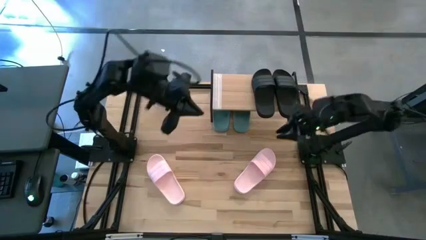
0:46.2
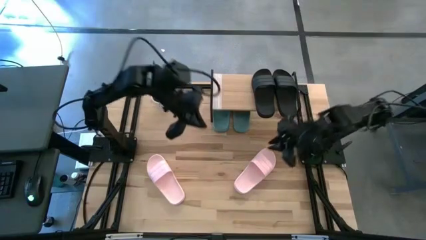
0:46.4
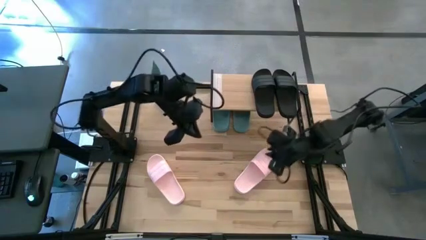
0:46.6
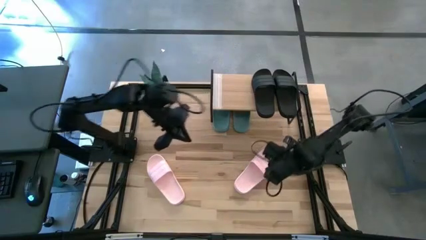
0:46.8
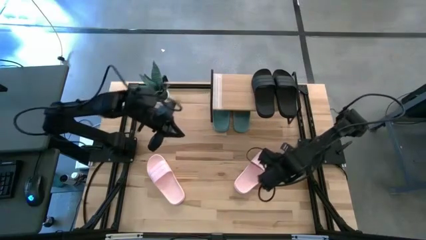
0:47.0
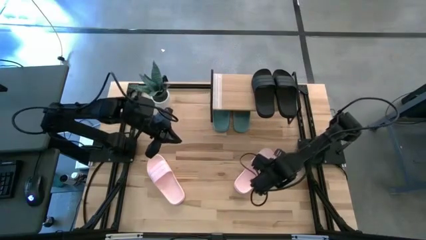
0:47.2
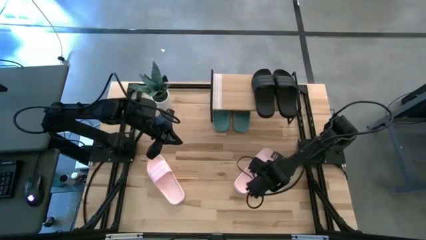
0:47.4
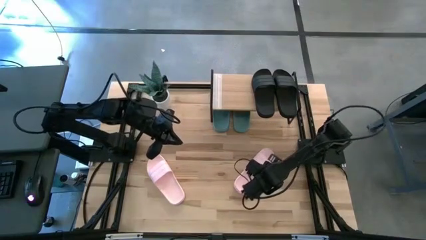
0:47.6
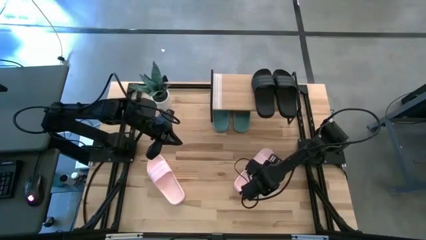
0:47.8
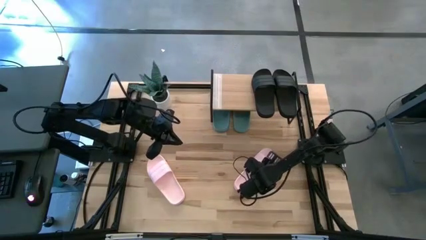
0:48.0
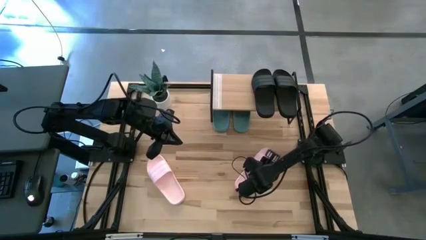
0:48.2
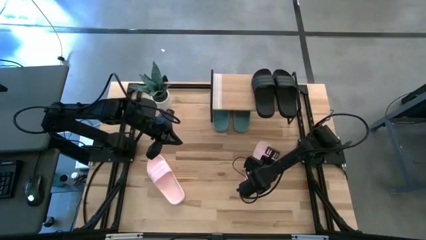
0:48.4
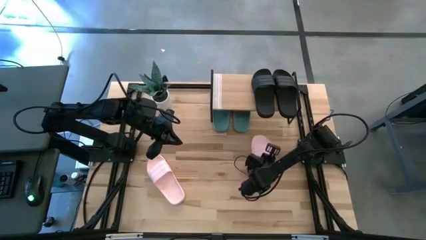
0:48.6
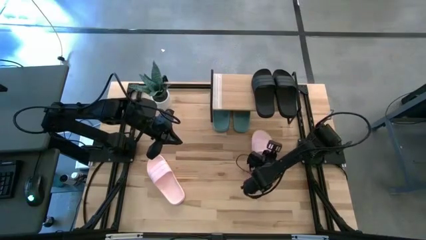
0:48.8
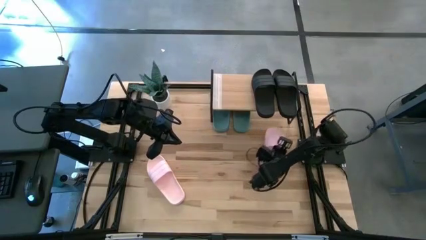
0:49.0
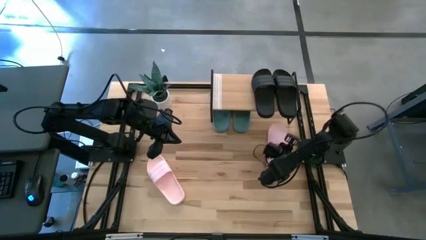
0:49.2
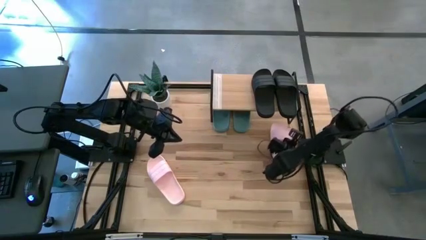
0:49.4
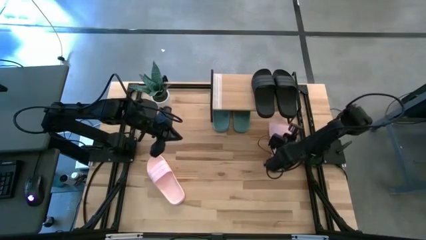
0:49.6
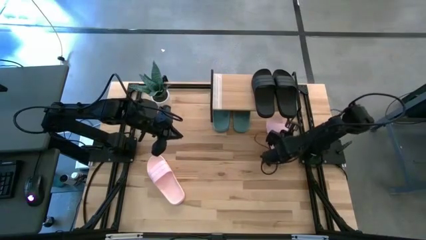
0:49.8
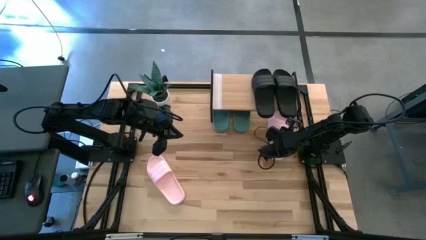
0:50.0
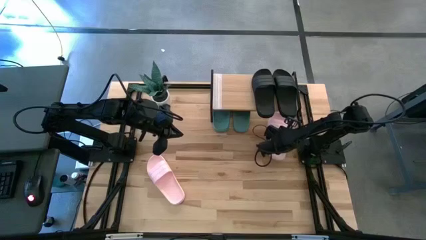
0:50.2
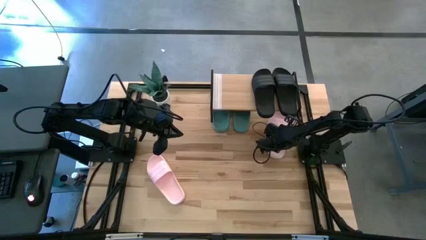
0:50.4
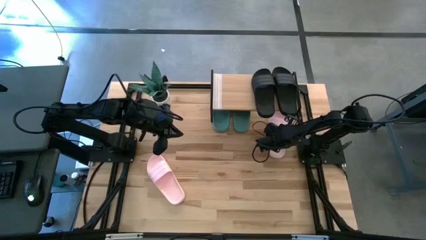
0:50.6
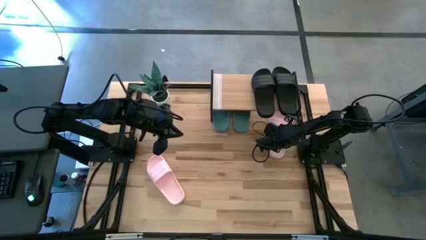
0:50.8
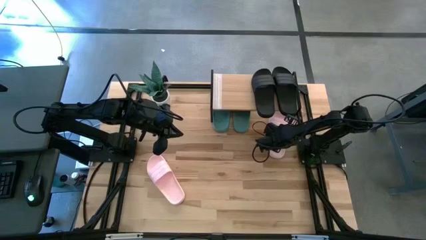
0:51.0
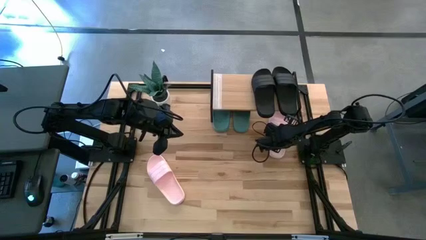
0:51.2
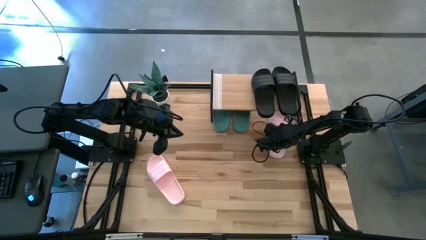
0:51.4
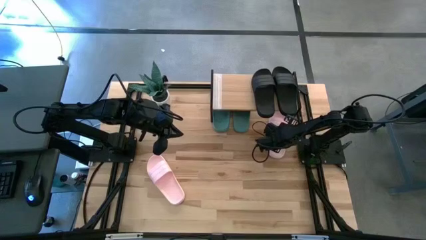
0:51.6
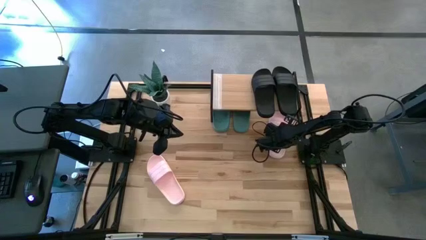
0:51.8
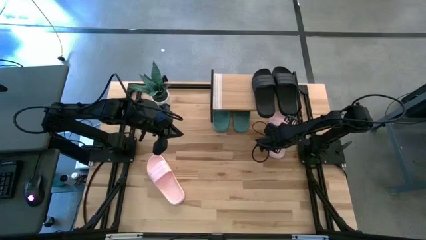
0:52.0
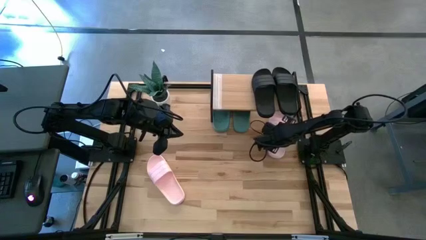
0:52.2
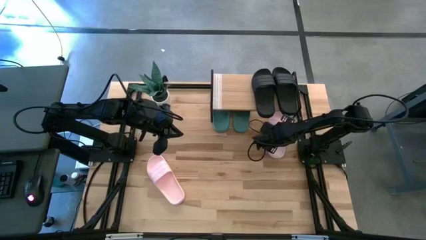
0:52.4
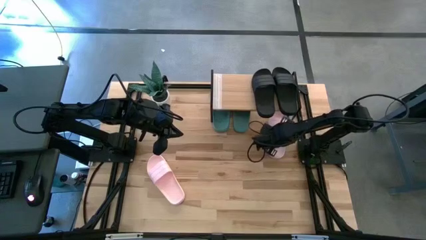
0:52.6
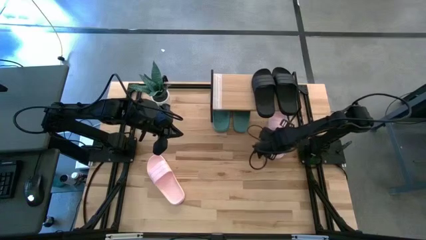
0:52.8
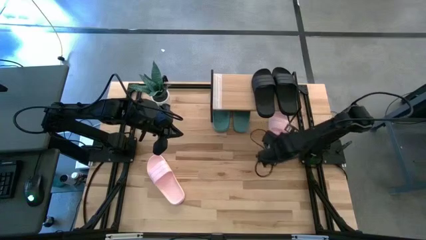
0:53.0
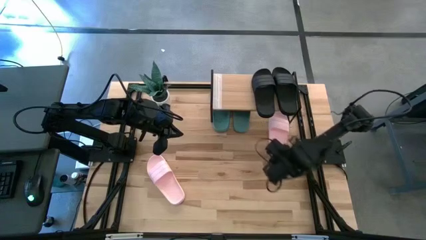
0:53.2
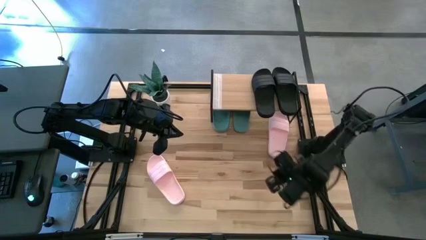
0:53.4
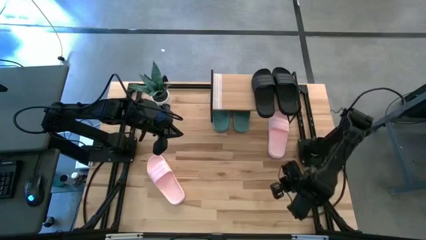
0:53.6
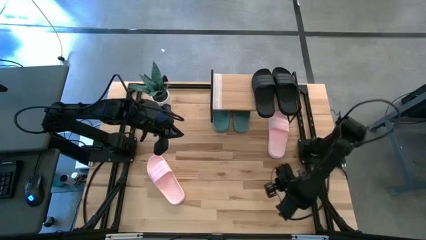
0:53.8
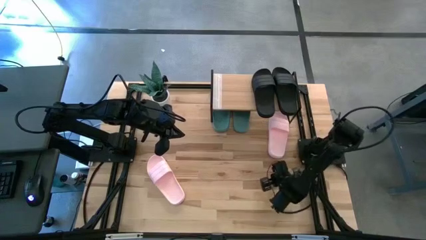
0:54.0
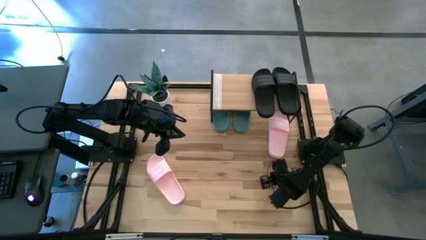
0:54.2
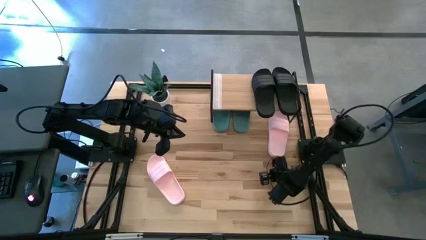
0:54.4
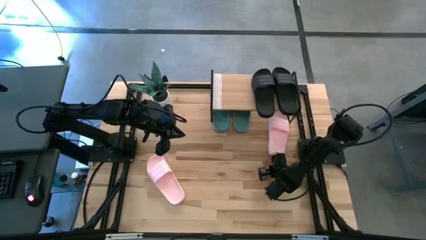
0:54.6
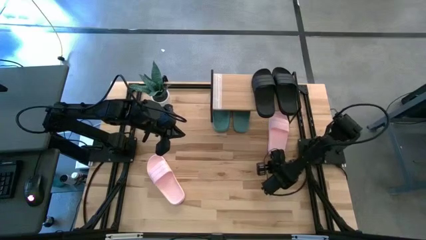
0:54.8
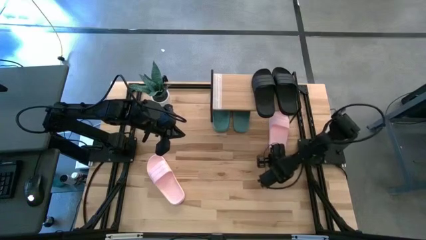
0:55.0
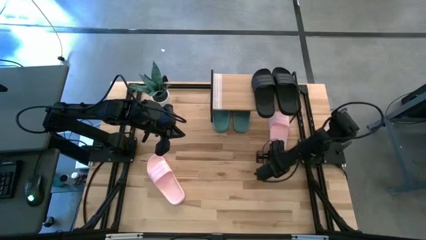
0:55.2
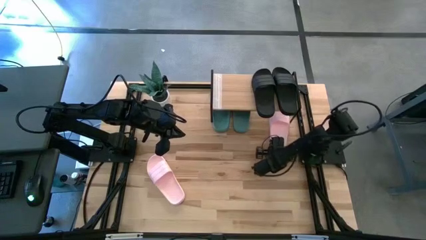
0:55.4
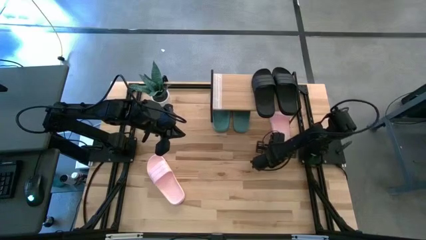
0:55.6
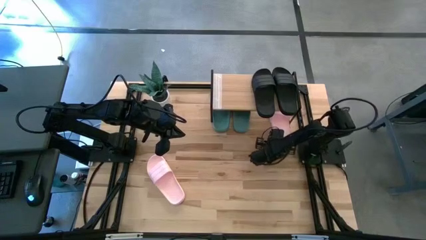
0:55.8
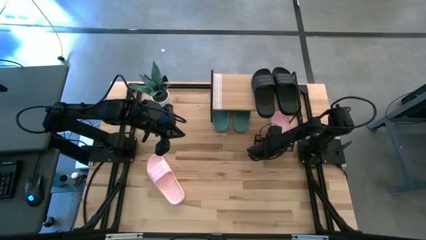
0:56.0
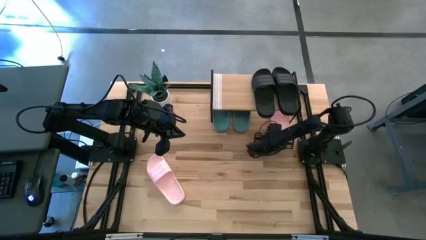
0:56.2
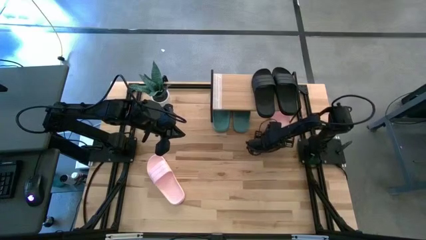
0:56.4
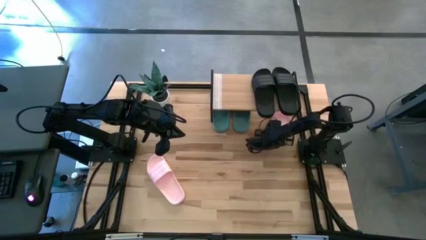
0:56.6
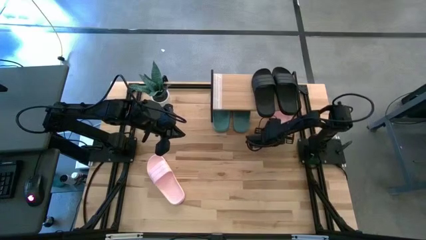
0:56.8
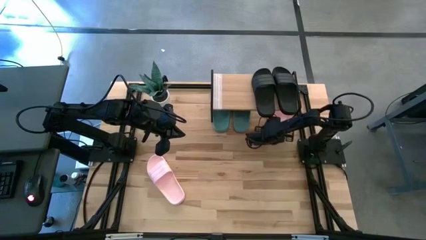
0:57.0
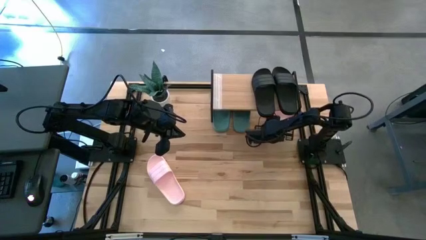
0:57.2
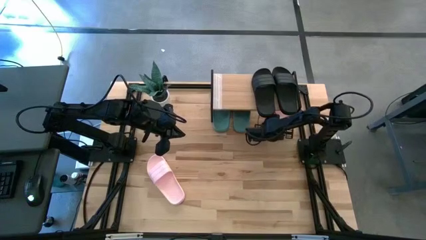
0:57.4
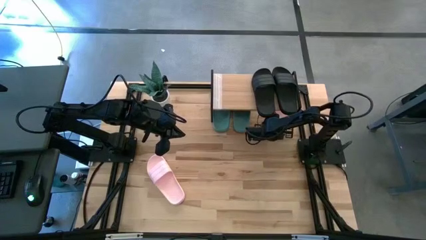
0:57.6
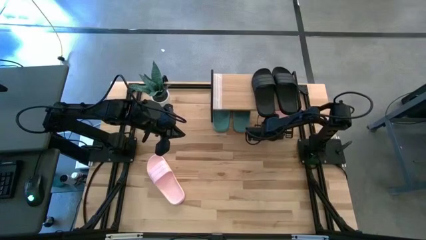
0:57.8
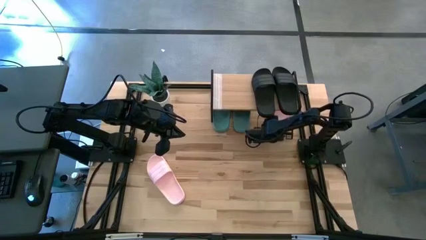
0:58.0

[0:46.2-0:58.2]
Task: Pick and place slides into the shelf
Move the right pink slipper under the shelf

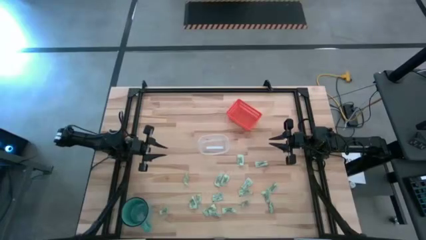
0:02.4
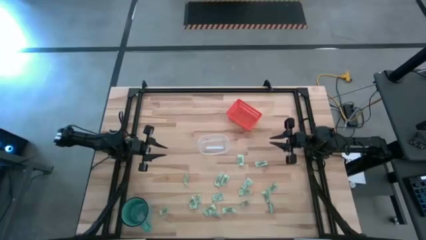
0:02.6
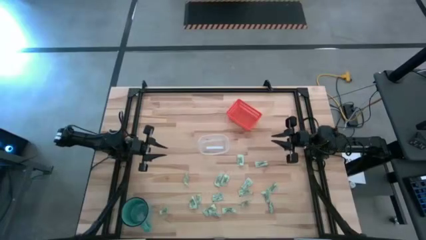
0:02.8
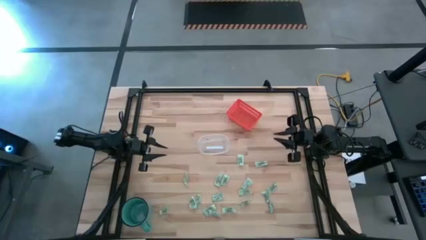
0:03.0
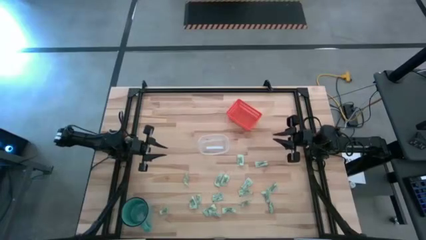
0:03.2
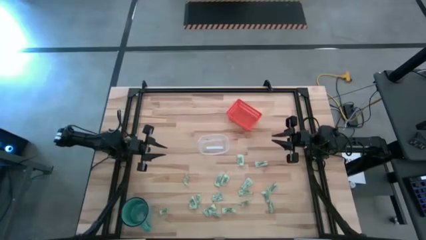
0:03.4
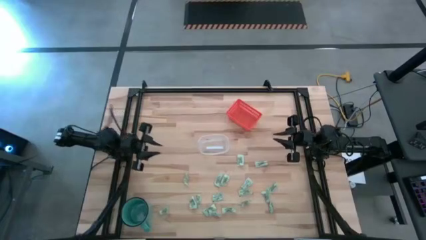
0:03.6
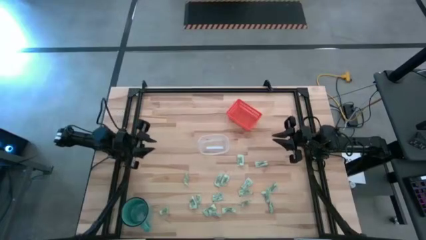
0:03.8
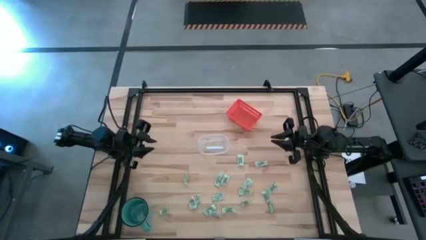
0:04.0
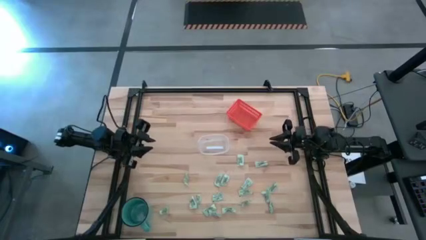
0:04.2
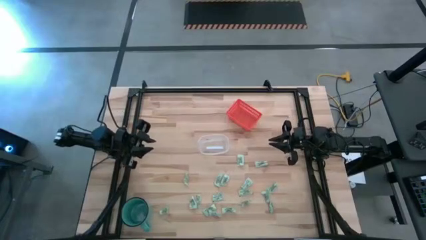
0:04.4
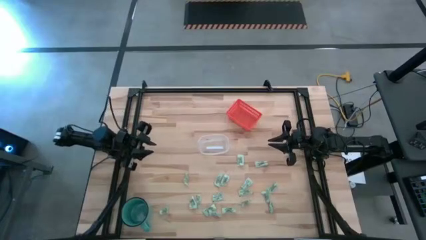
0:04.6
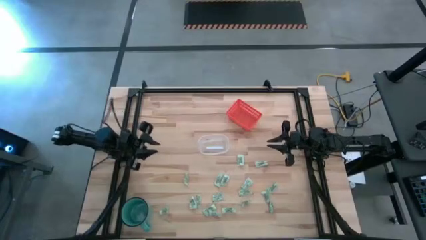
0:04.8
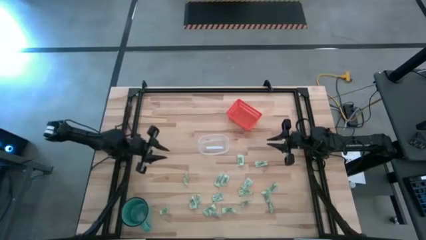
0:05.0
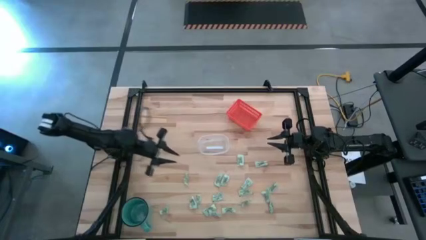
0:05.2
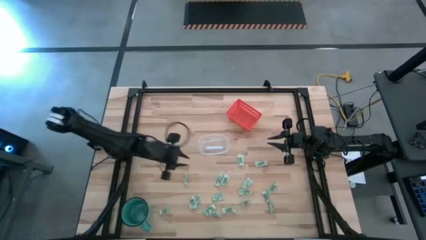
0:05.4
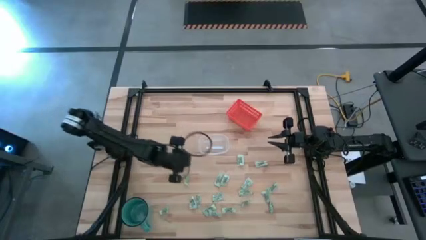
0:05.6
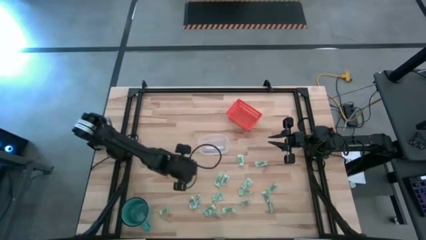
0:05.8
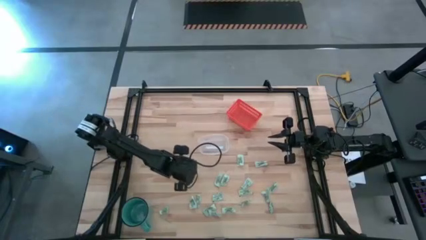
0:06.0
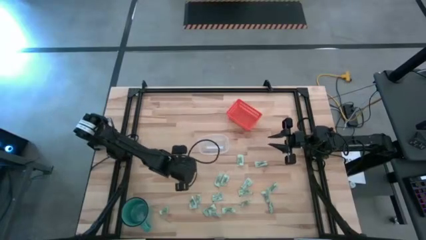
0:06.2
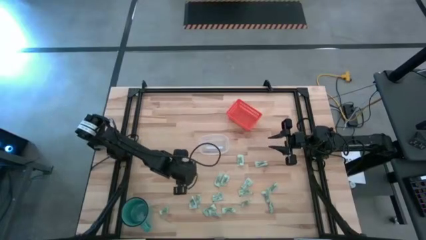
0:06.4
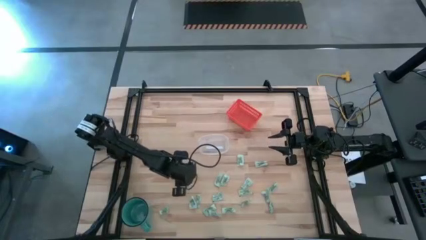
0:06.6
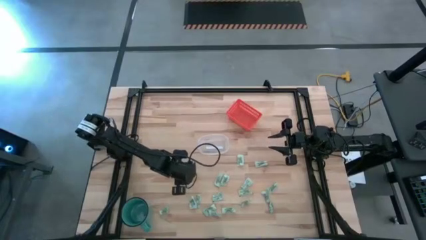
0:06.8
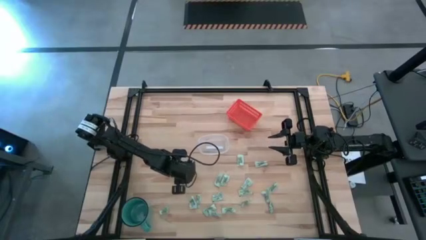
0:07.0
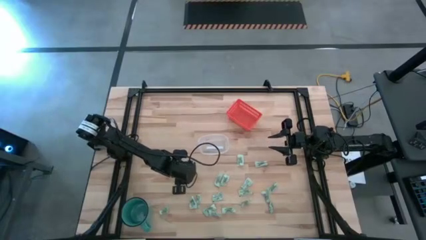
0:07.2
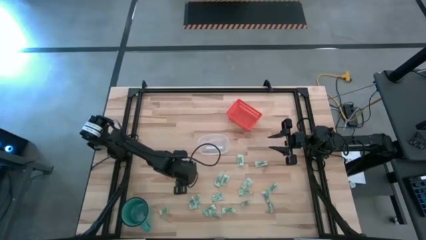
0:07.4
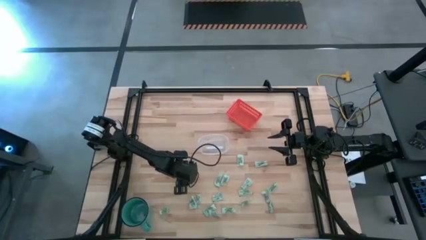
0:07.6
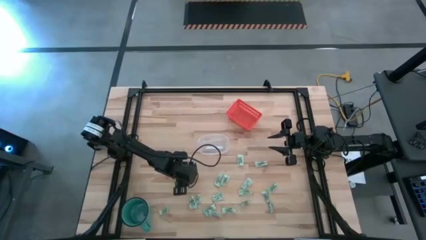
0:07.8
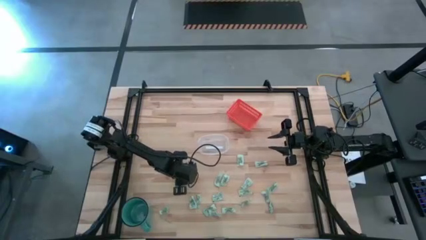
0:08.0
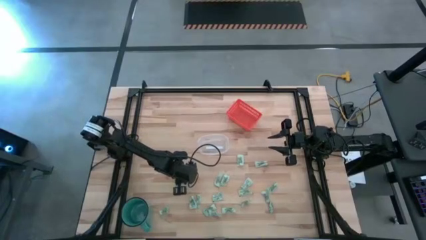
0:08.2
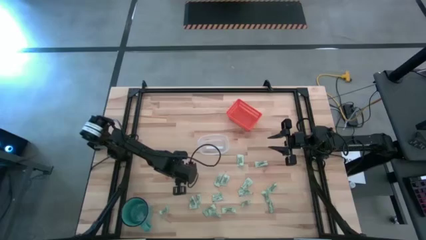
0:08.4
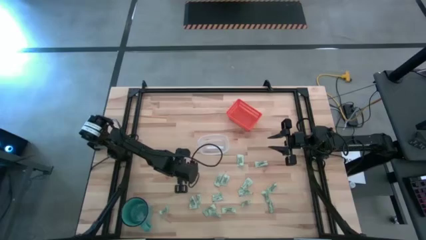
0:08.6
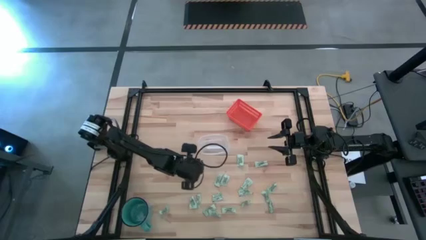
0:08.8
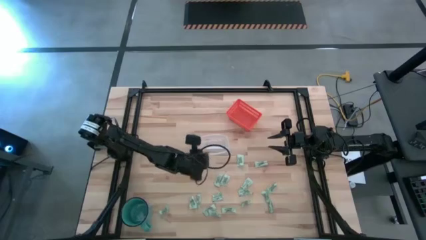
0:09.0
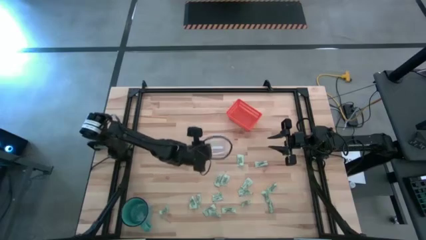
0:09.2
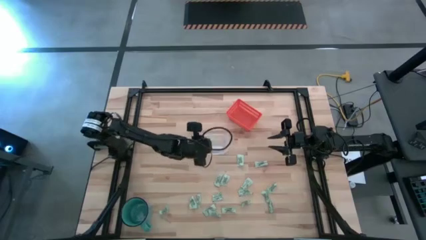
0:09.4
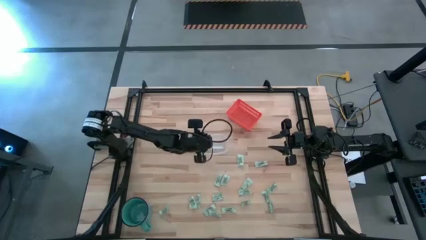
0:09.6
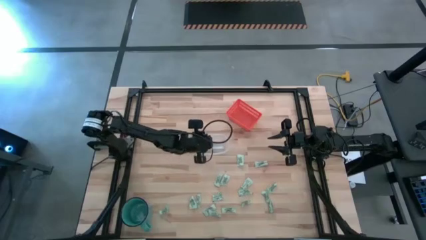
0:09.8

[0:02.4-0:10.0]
Task: Pick and place items into bin
Put the stevia packet into the transparent bin
